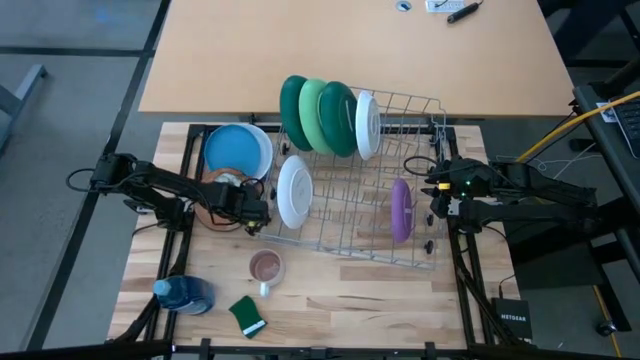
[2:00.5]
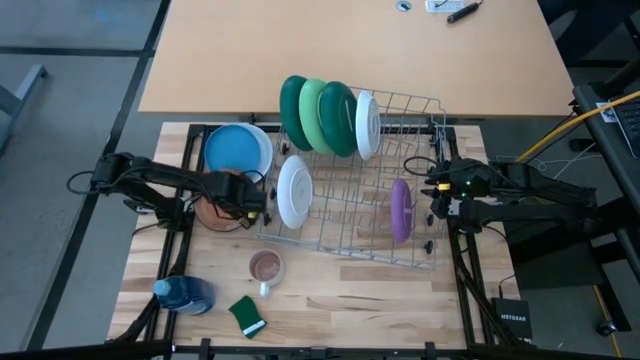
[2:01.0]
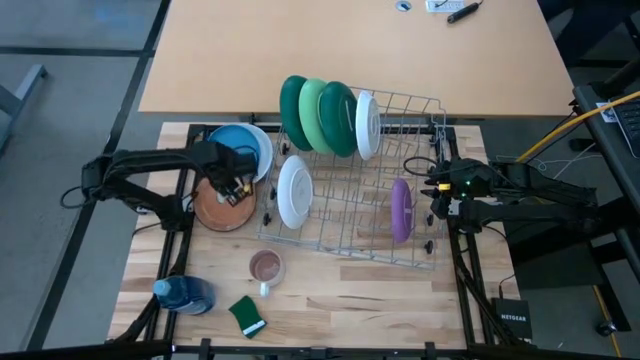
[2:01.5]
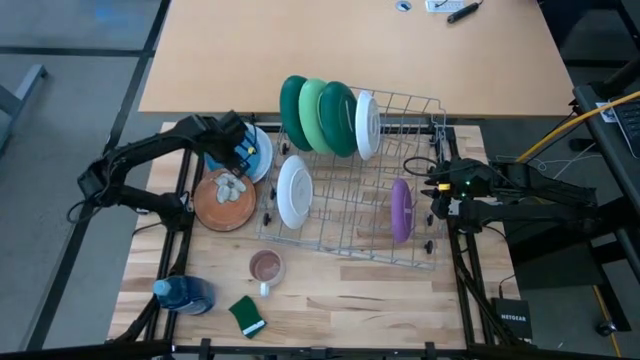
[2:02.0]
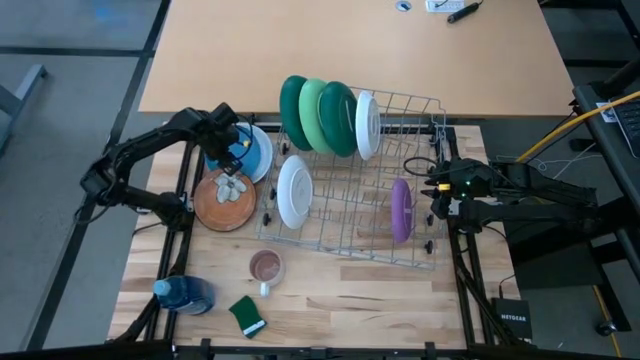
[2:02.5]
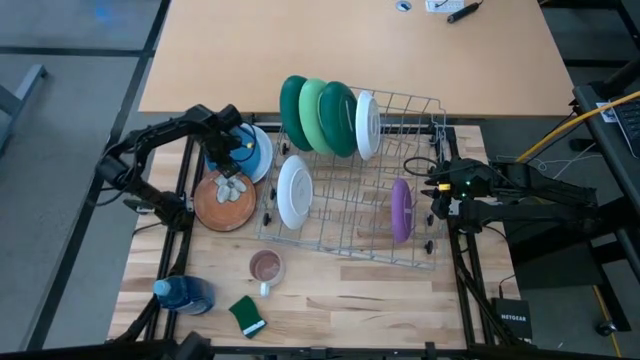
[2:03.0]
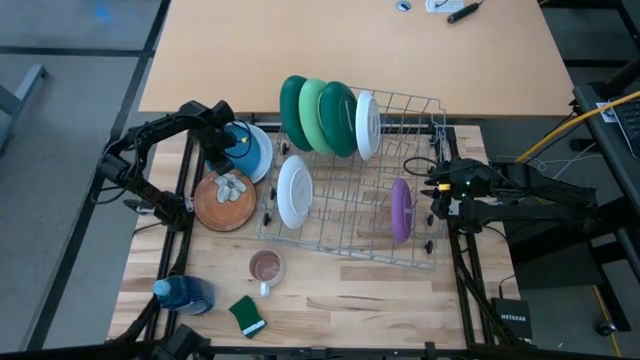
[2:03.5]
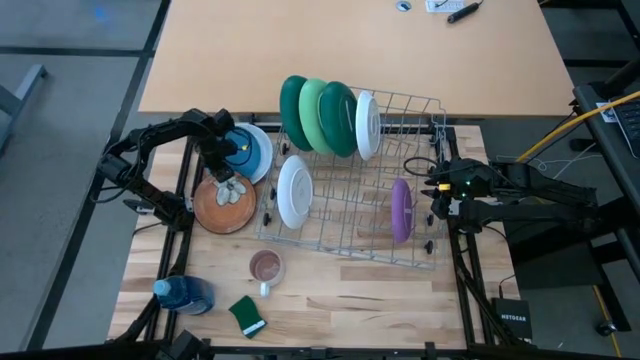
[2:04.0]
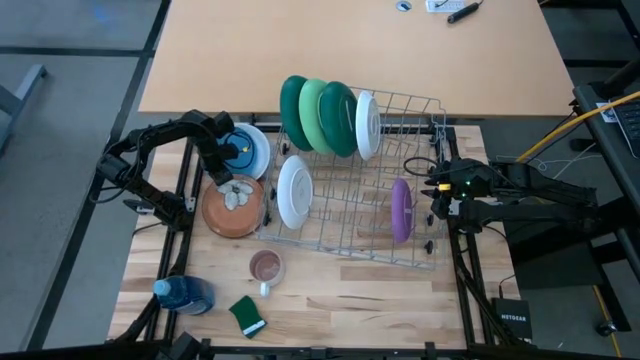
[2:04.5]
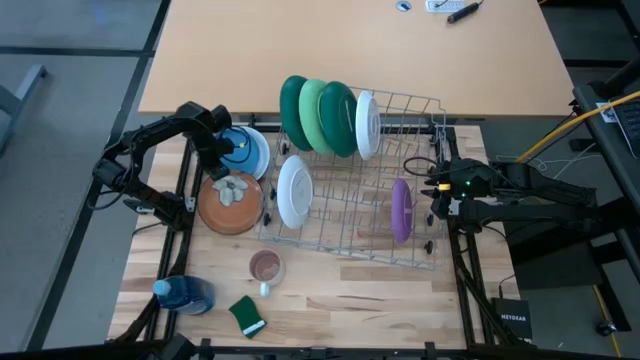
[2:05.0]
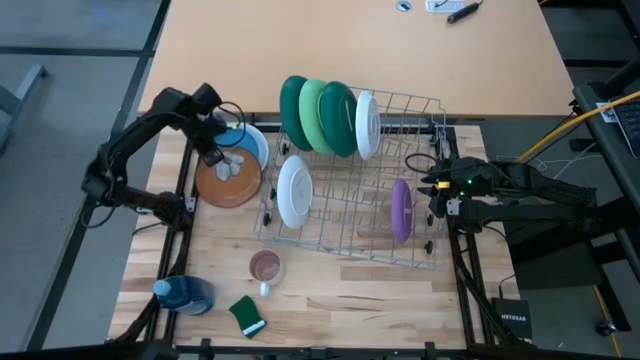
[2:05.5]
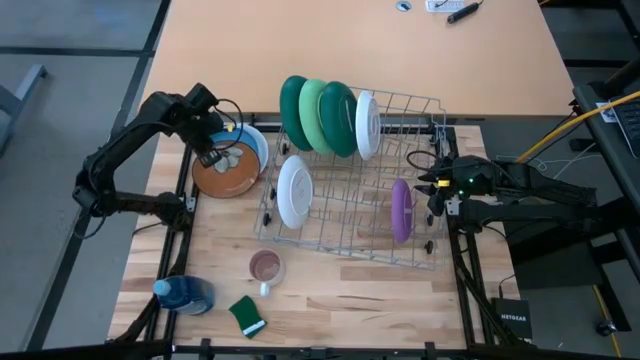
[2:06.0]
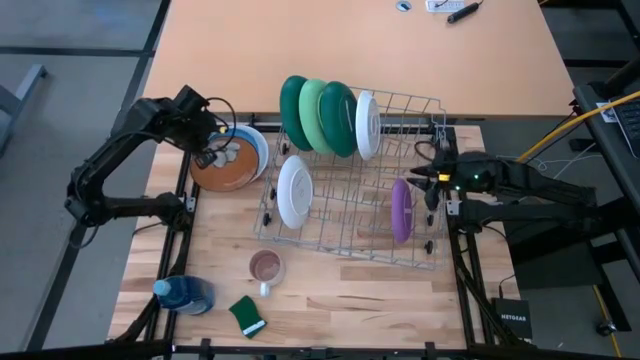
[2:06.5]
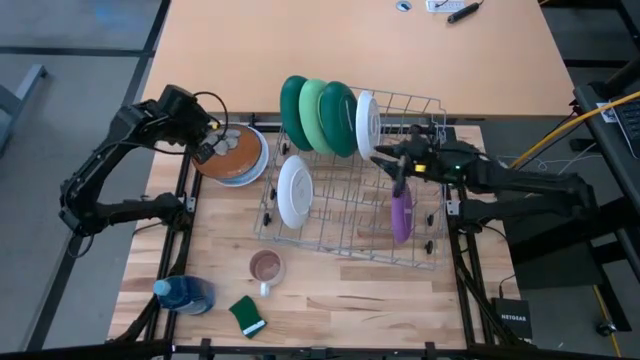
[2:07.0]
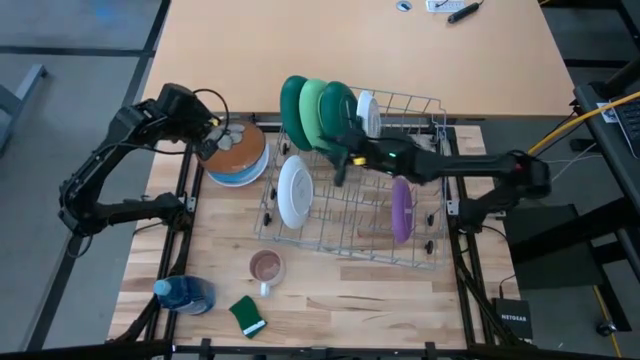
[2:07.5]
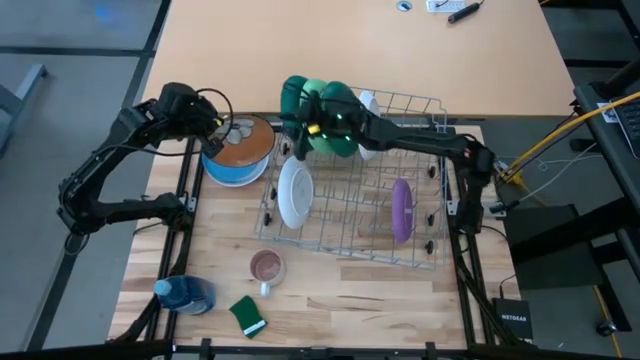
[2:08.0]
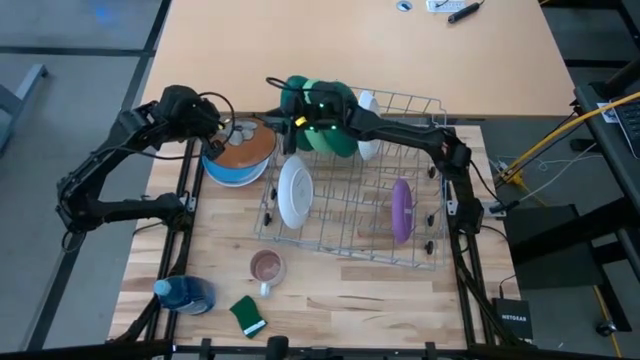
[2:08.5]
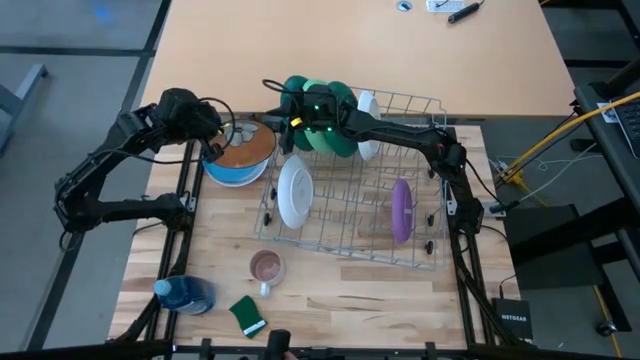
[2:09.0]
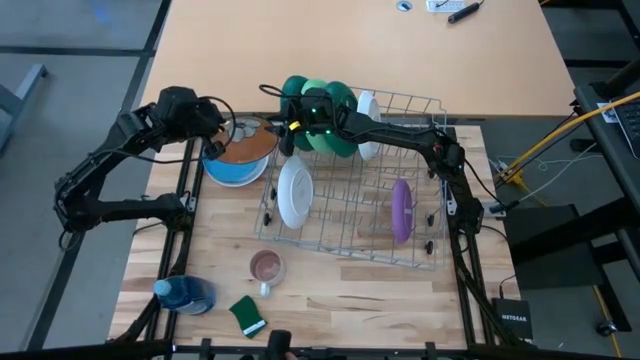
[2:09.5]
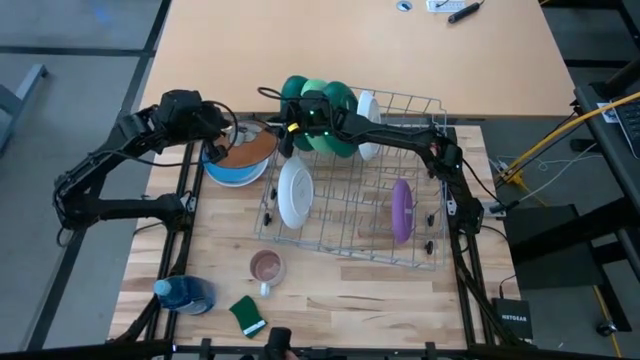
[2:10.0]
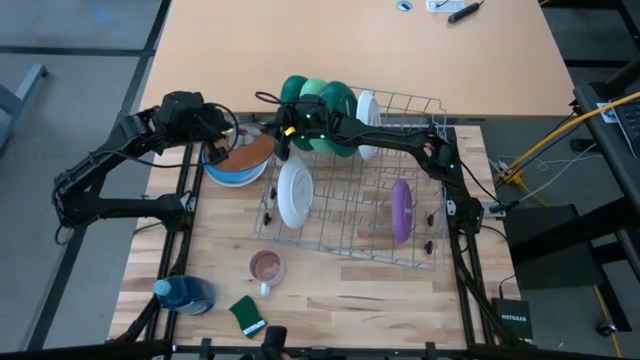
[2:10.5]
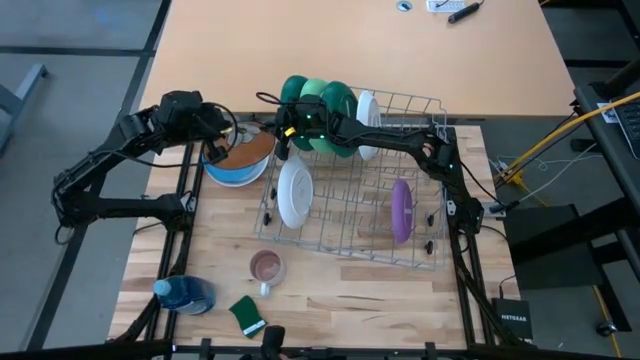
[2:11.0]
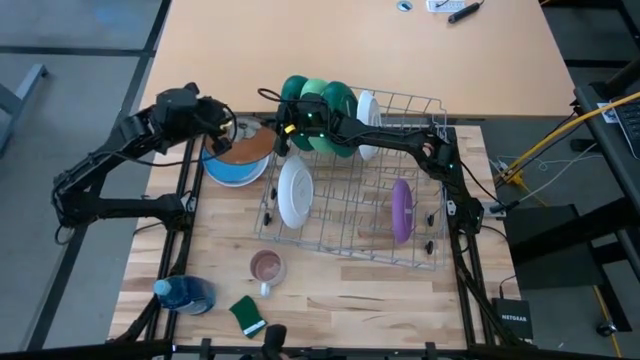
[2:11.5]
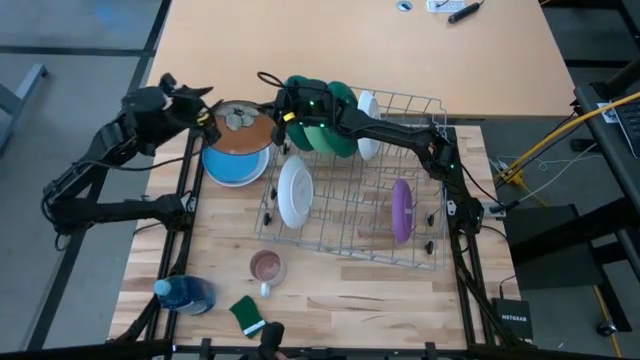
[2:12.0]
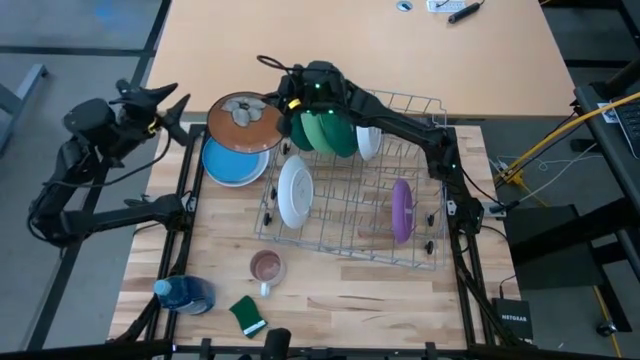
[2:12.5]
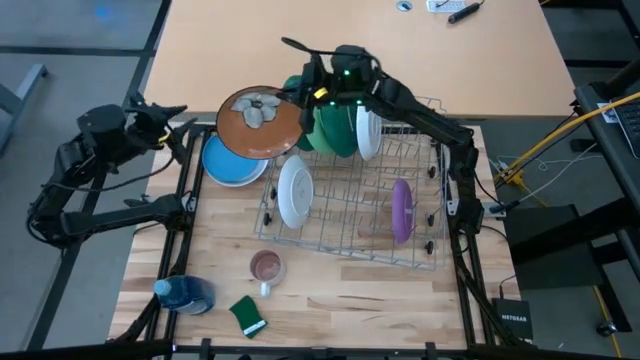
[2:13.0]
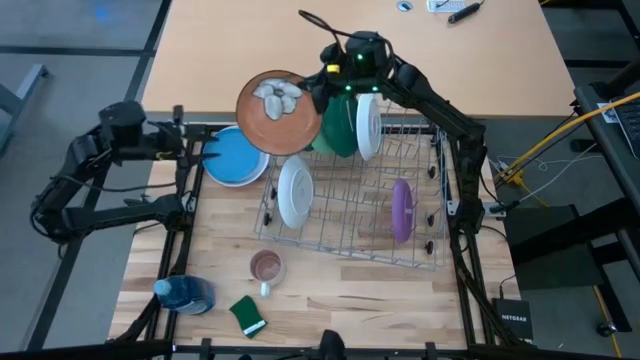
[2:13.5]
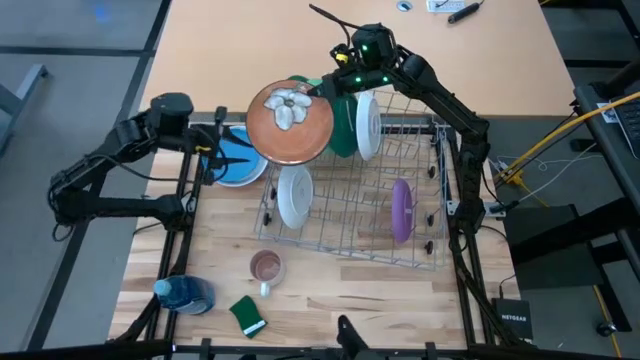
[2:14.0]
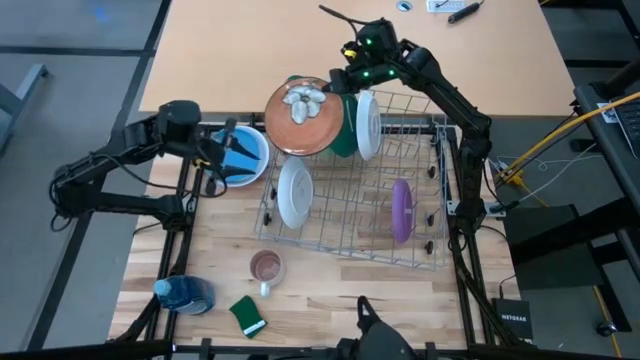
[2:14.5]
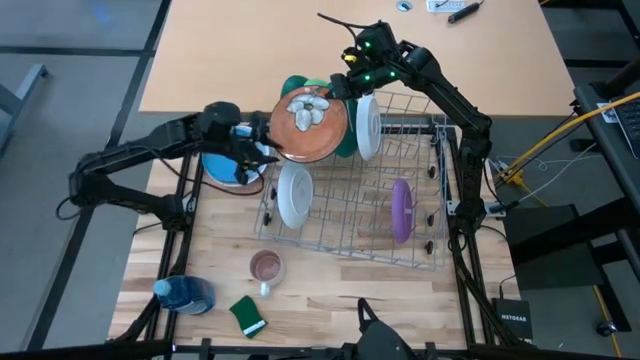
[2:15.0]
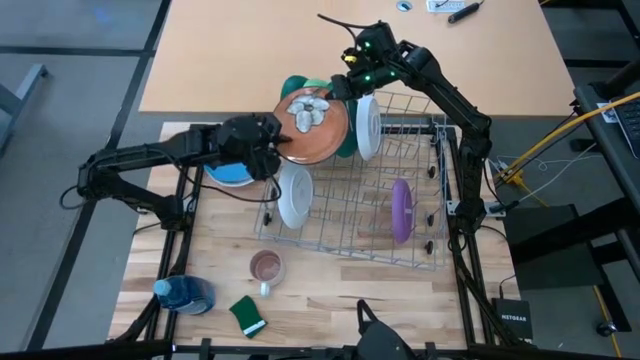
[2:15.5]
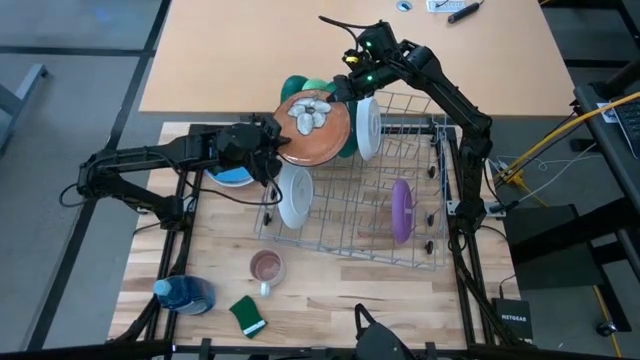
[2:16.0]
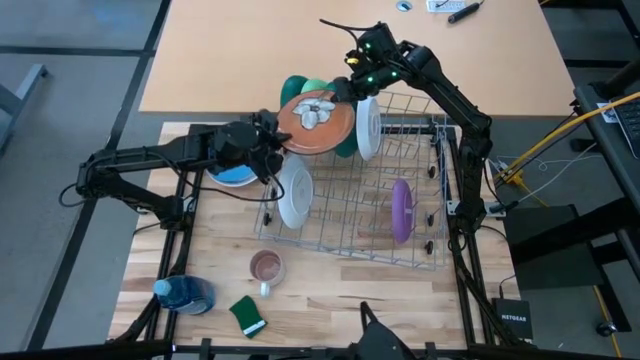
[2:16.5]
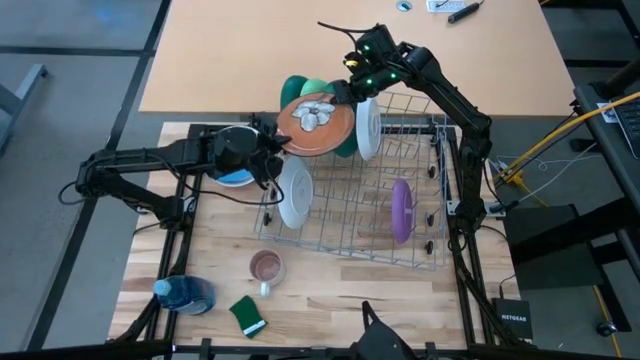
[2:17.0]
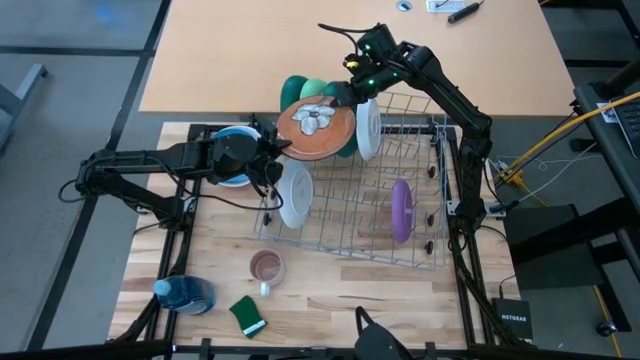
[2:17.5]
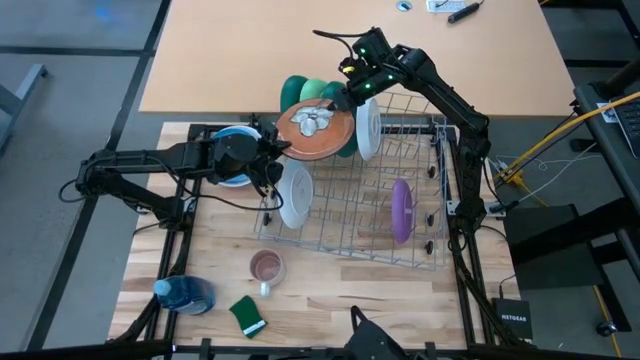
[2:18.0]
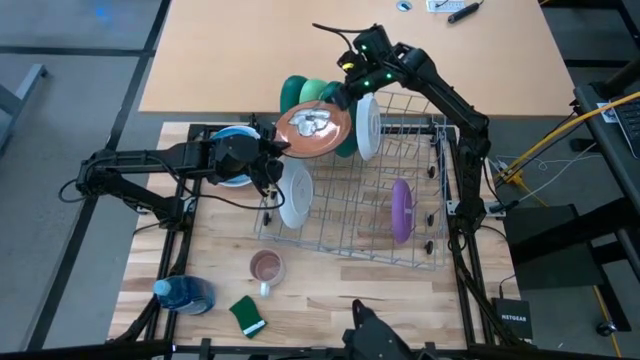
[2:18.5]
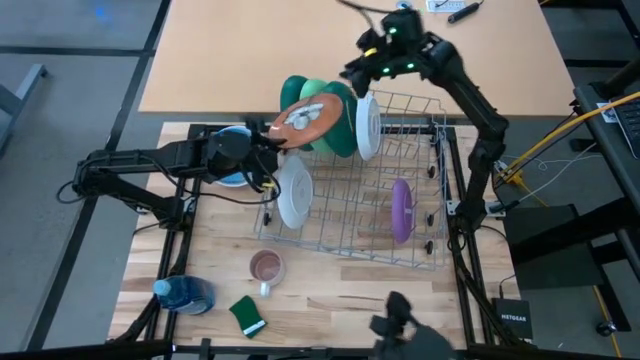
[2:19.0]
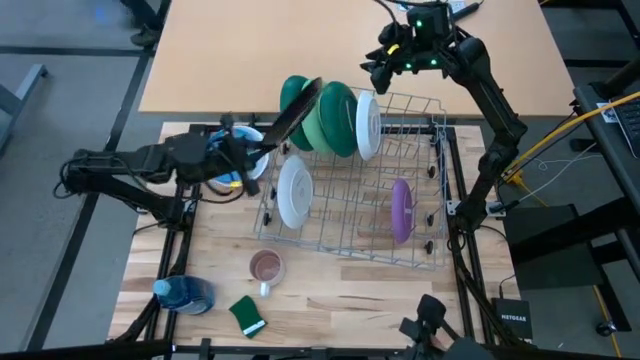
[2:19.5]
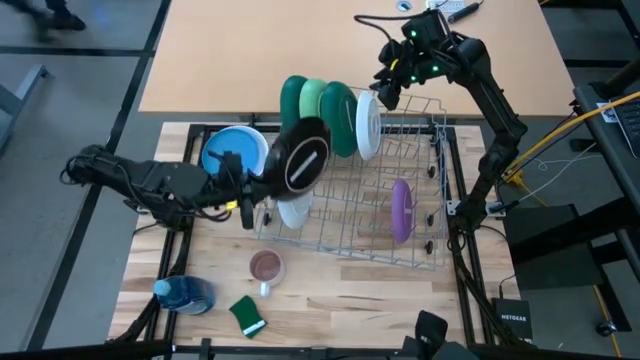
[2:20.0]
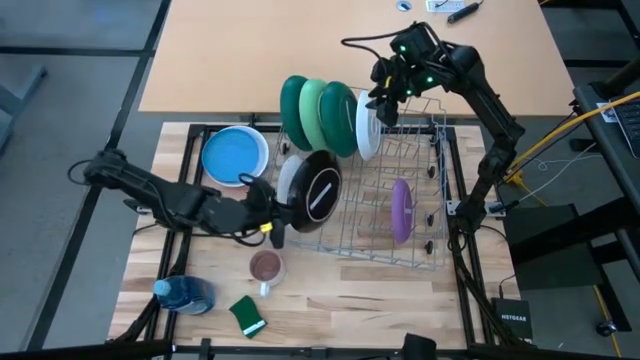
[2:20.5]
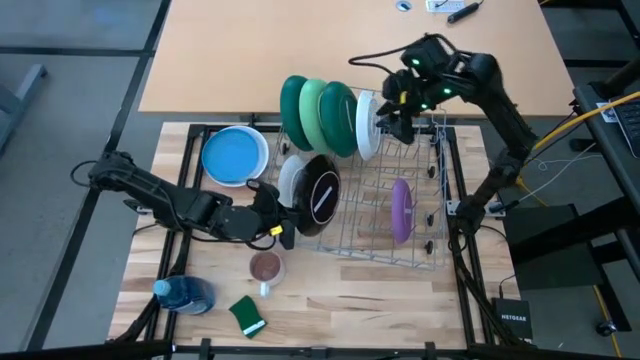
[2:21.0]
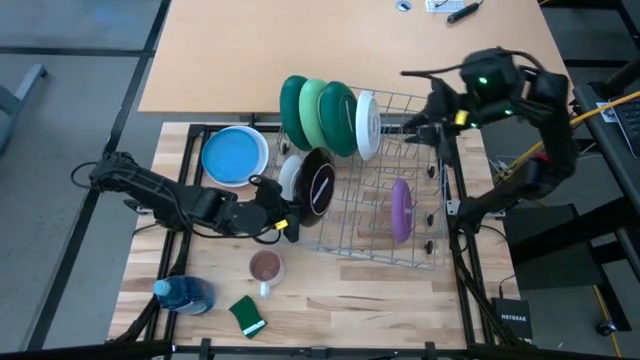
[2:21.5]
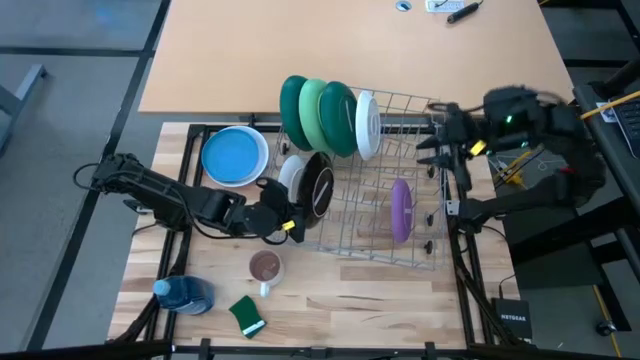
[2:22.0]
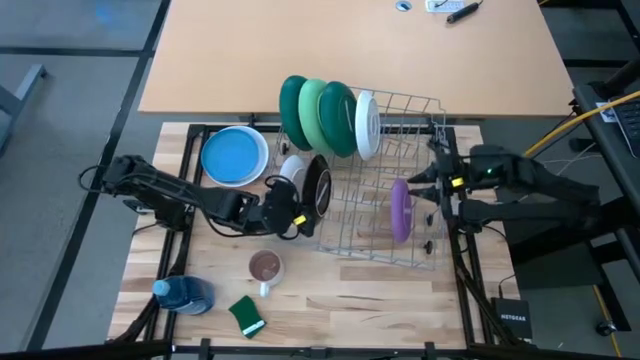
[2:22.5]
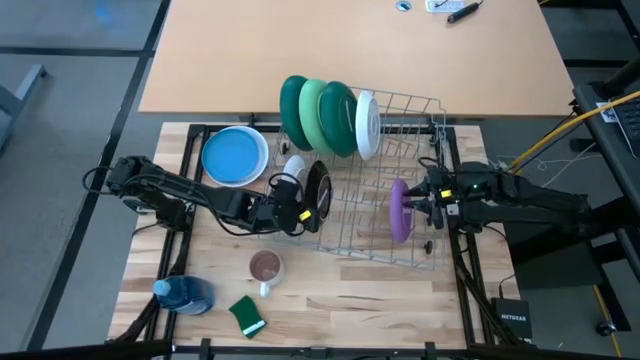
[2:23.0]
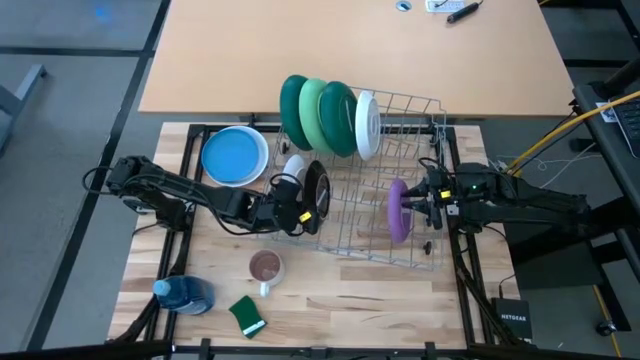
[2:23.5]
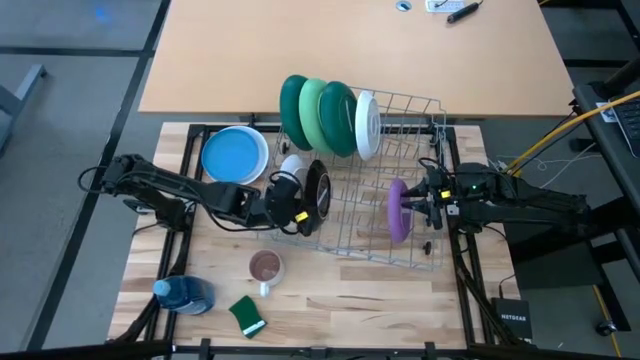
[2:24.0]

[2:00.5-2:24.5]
Task: Sort dishes
Put the orange plate into the dishwasher rack
